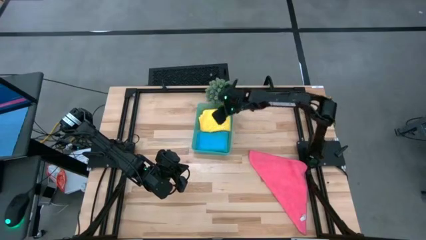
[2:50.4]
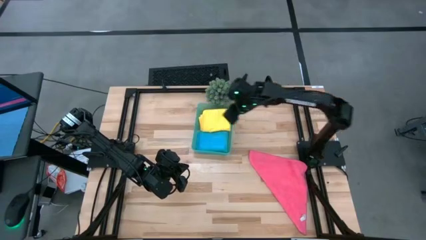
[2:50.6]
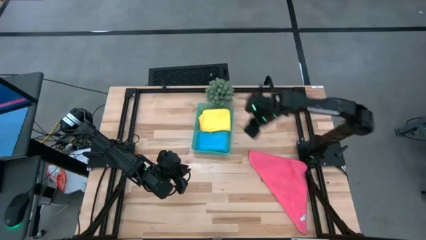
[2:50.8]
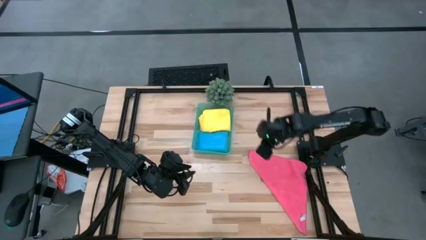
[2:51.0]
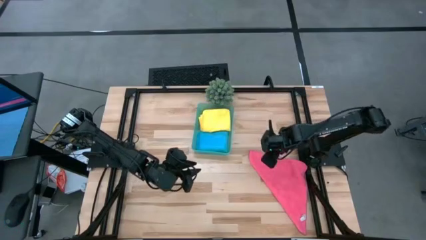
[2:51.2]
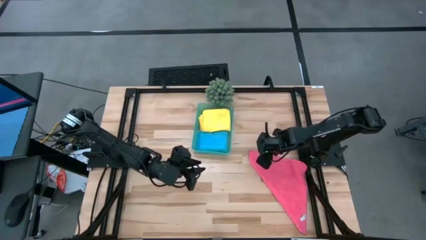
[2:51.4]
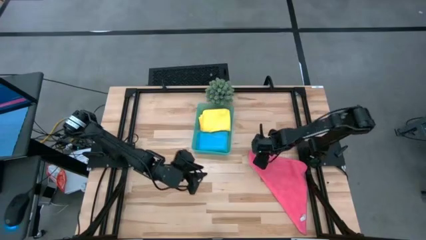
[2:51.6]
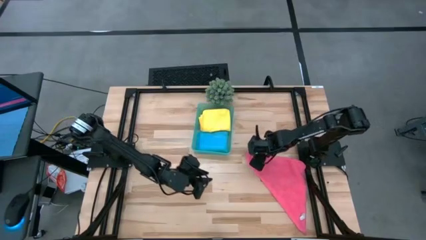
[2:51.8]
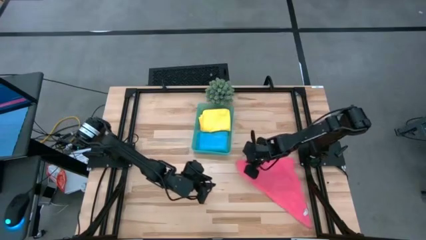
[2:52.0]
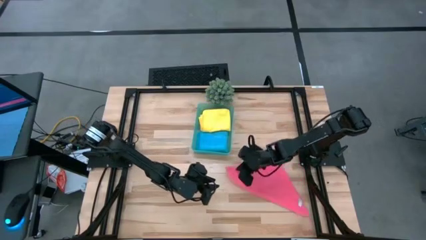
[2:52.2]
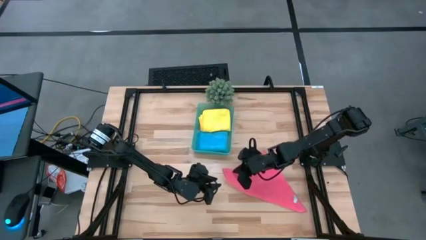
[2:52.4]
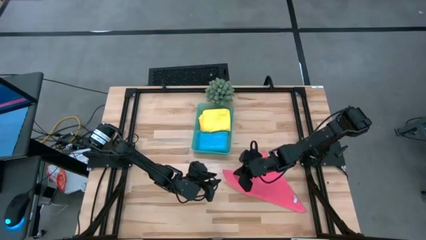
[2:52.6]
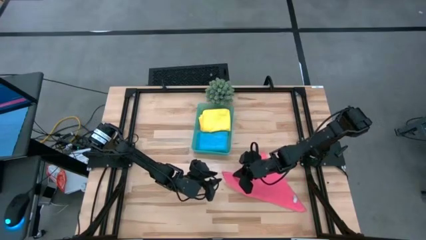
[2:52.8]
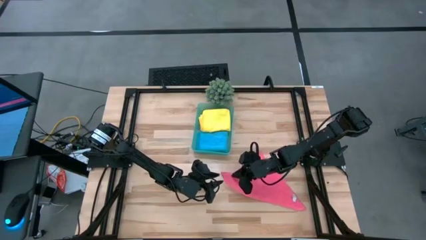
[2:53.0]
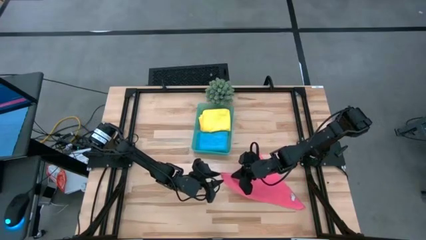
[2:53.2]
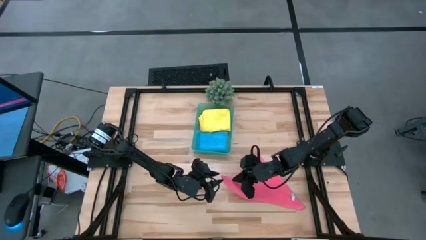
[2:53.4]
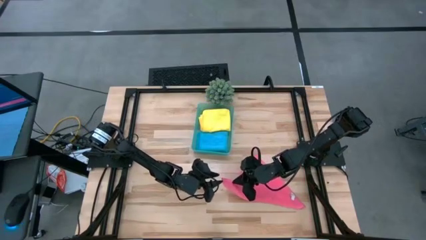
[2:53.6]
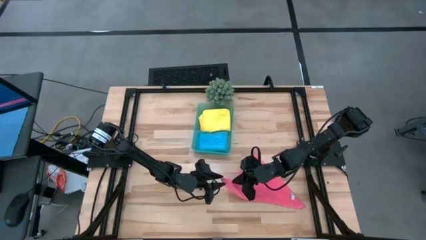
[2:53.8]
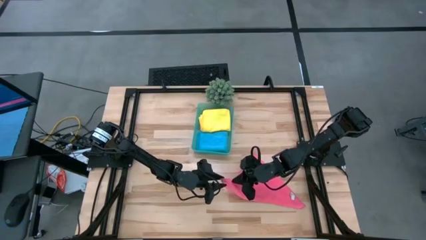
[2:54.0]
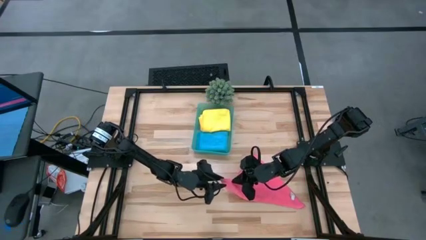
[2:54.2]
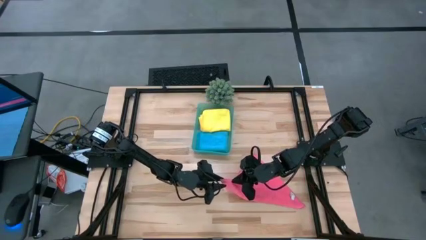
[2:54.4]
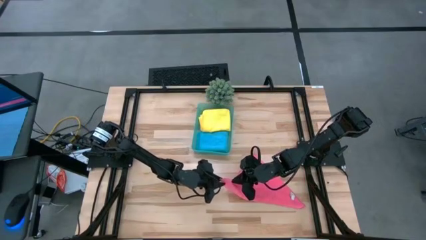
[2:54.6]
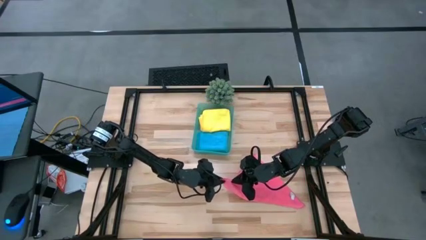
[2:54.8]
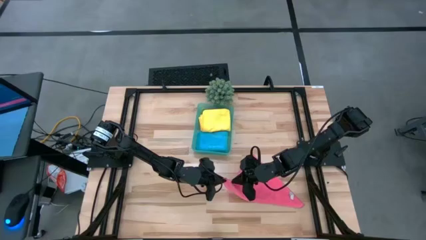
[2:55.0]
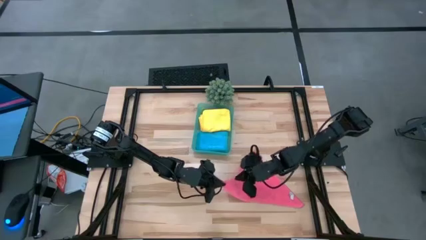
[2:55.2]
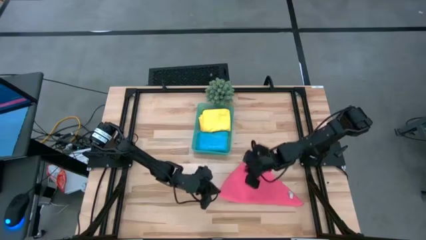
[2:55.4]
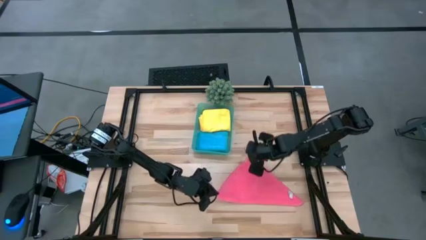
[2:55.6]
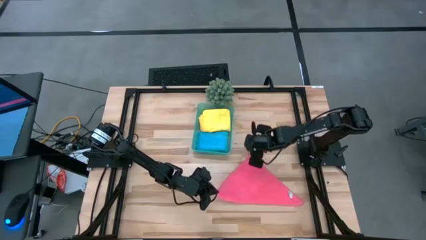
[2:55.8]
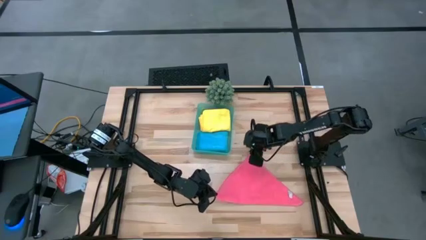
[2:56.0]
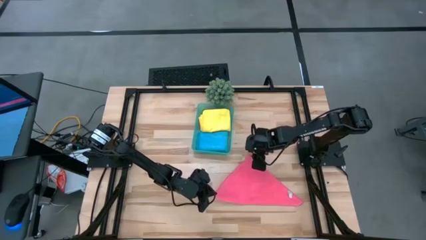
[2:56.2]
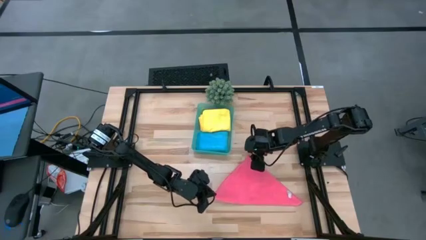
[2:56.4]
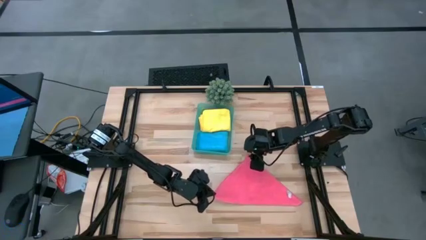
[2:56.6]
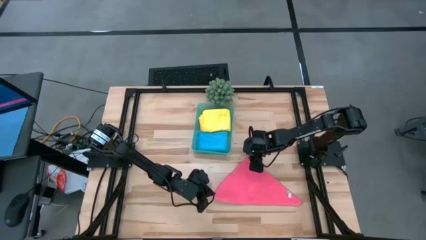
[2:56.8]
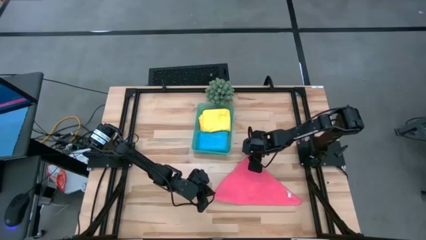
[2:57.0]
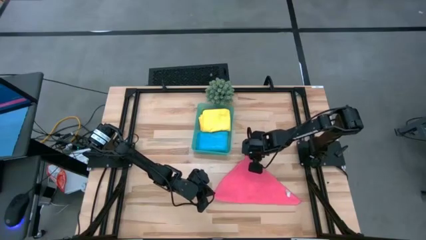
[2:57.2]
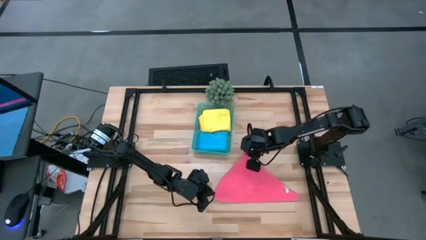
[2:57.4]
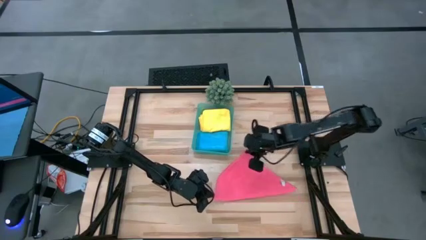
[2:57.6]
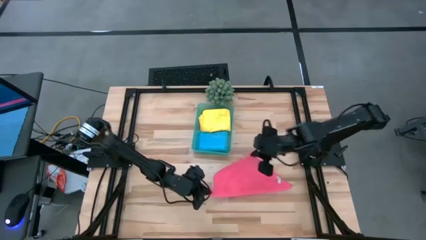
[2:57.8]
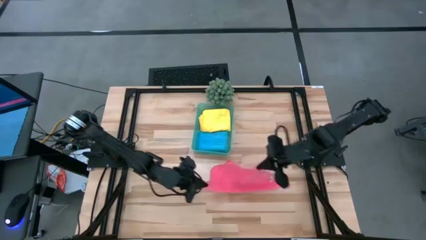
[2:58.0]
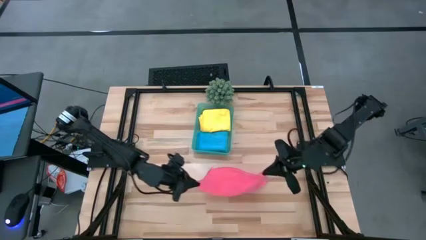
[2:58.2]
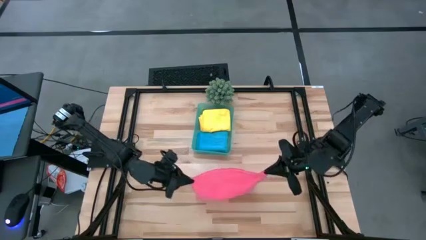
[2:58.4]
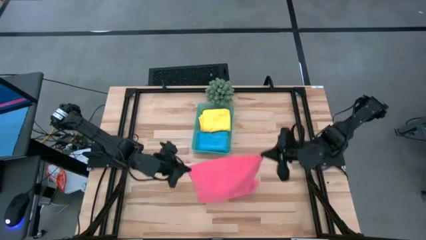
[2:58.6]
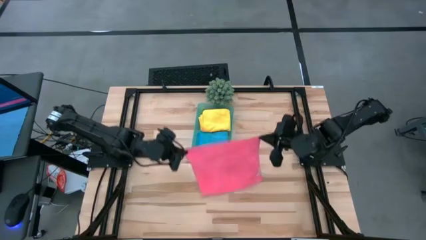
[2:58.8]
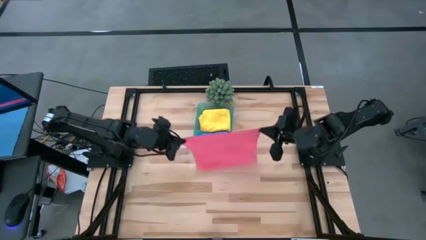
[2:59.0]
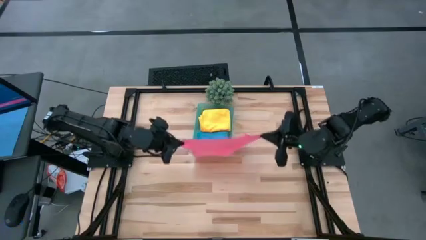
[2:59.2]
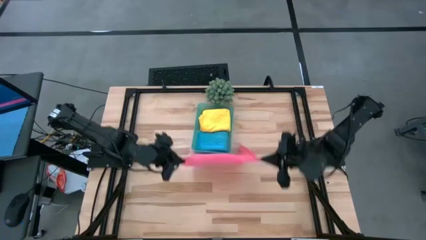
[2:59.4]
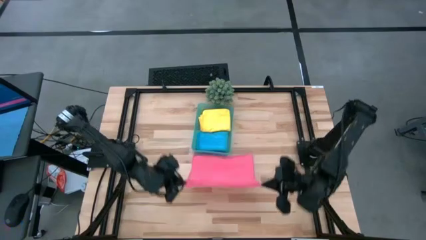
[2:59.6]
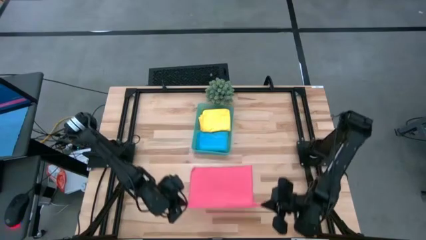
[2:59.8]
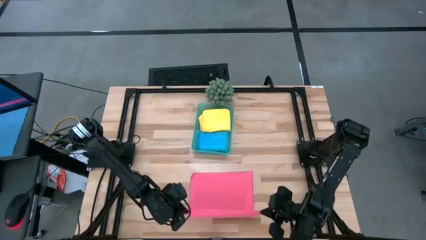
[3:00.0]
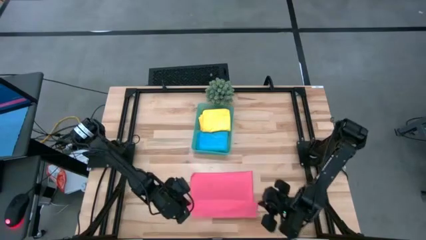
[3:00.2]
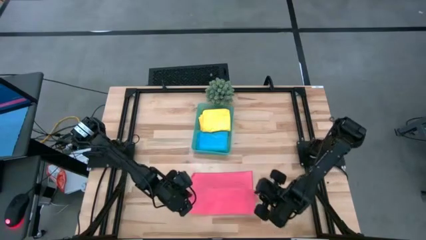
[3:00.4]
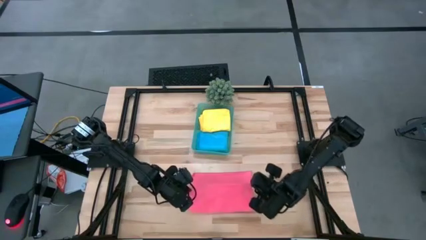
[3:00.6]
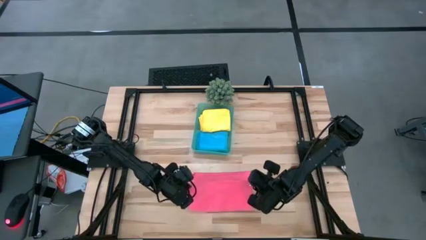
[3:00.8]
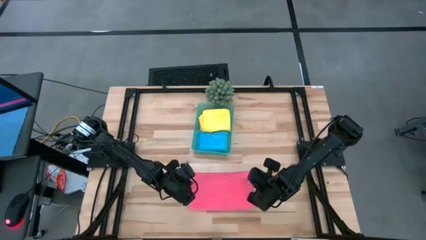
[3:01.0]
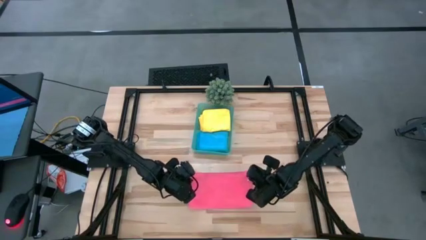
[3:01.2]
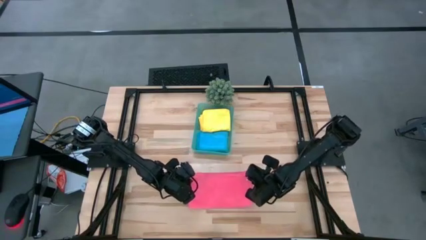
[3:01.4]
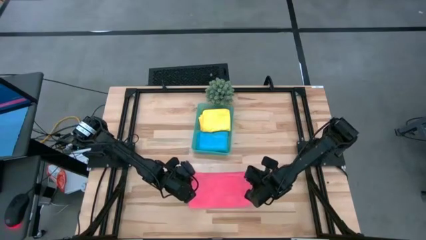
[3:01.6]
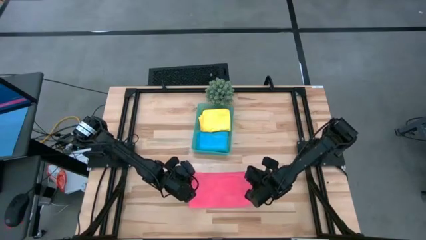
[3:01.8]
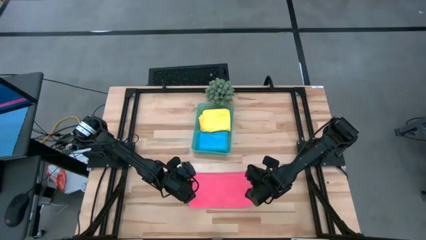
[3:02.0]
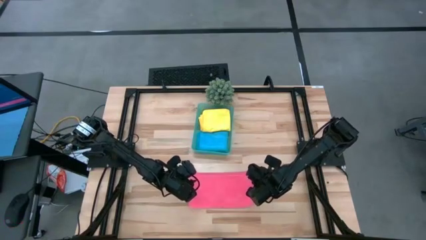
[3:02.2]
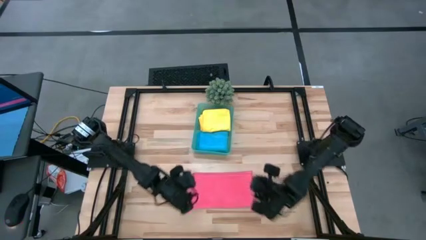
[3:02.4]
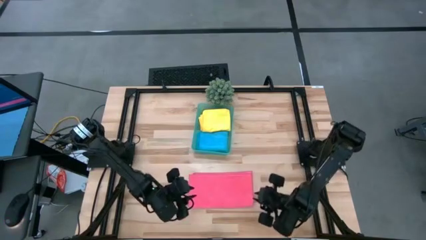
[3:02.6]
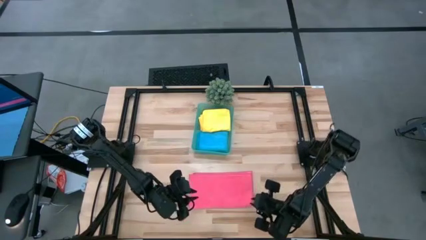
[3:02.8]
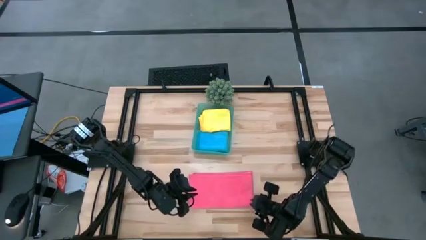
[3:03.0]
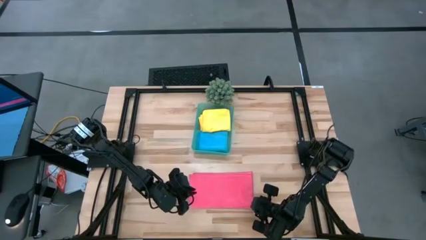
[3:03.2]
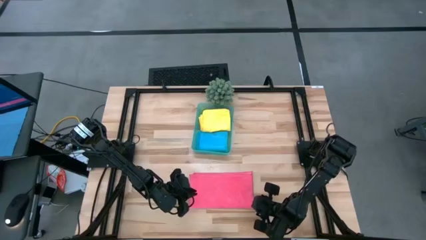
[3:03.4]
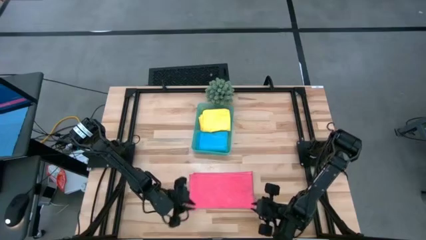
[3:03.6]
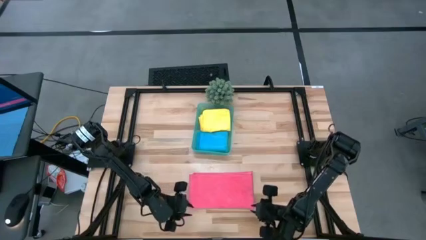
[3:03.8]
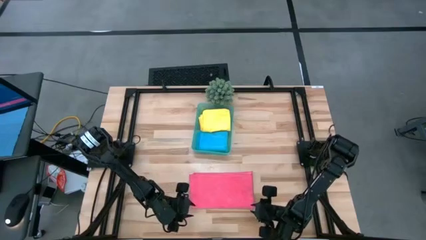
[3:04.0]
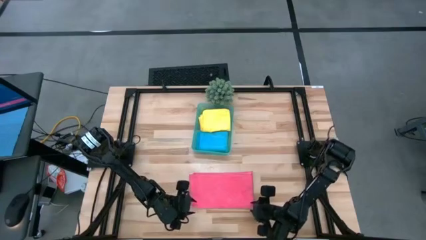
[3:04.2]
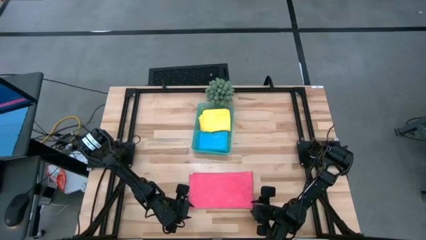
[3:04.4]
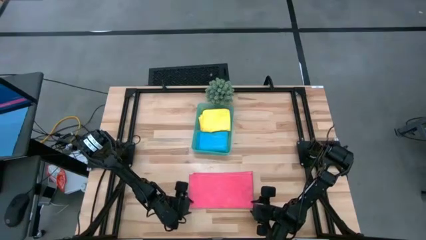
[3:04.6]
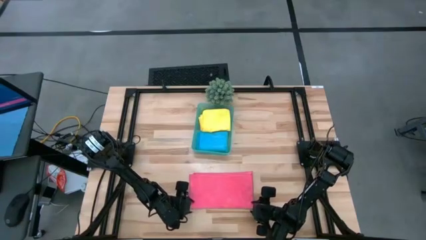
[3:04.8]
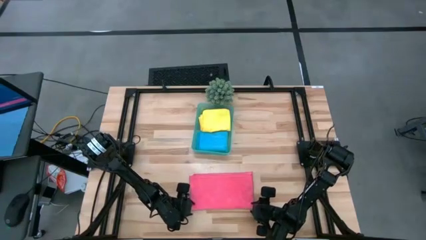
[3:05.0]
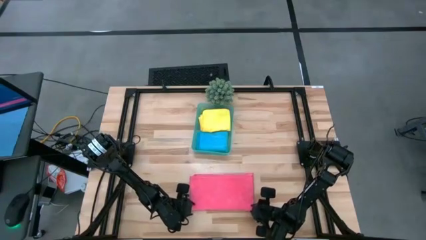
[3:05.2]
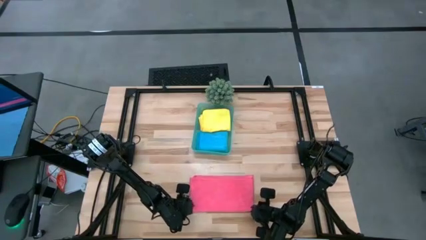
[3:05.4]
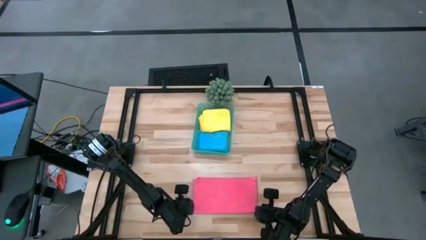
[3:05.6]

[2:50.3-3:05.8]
Task: Fold microfiber towels
Fold the pink micro fiber cloth

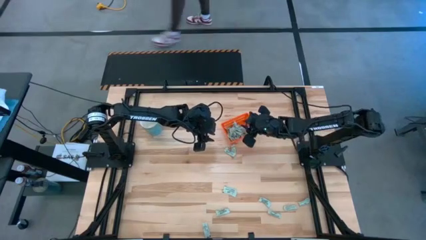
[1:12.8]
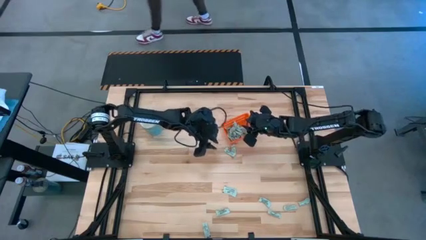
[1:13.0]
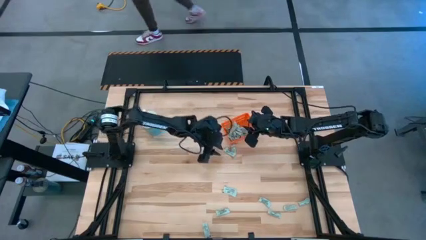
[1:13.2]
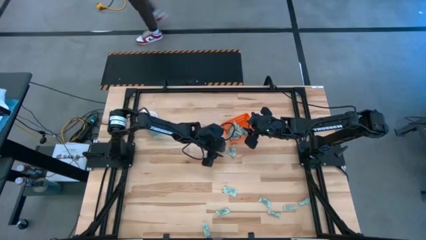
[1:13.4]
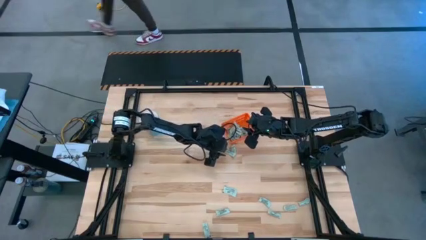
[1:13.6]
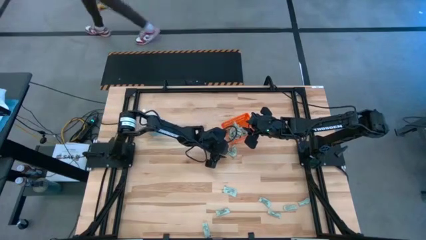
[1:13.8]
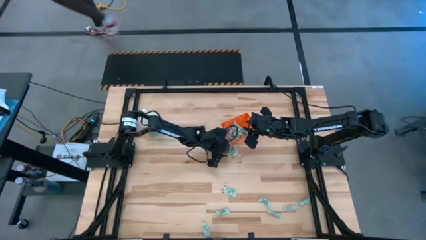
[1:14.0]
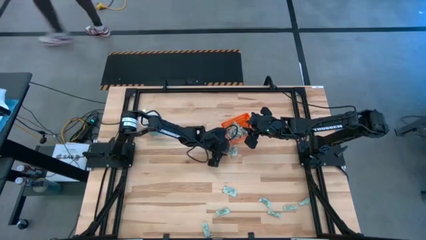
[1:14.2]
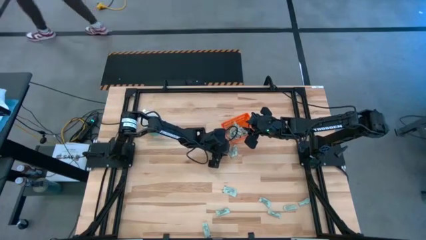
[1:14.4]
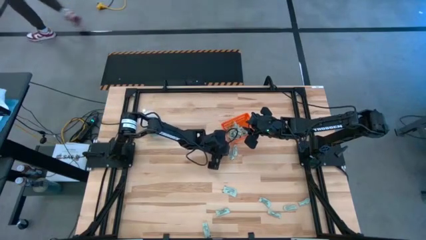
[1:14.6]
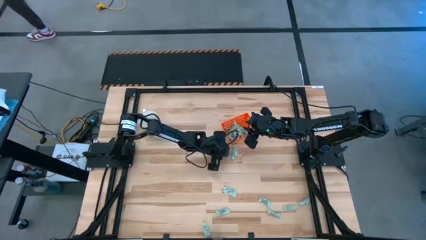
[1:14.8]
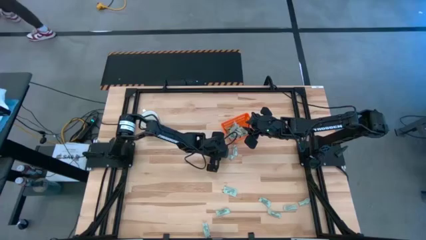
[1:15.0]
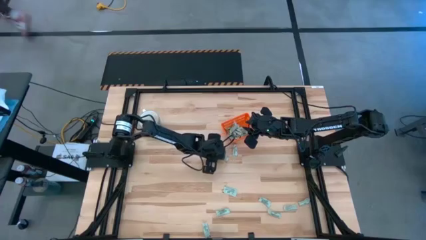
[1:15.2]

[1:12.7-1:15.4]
Task: Pick and place Stevia / Truvia into bins
Put the stevia packet into the orange bin
